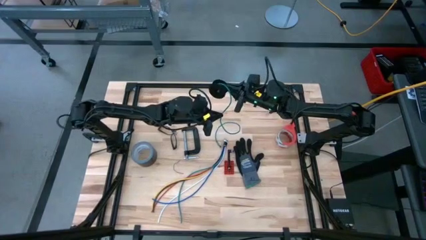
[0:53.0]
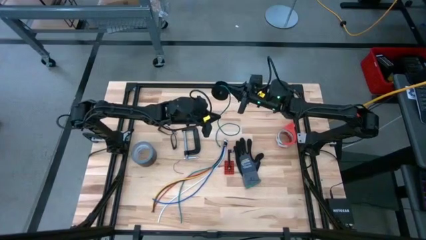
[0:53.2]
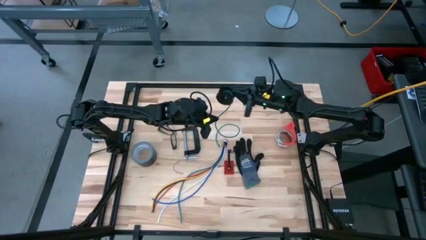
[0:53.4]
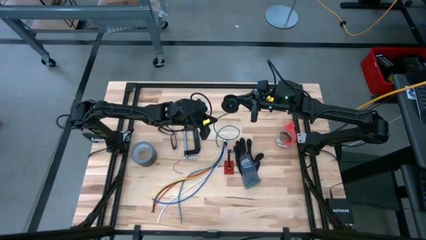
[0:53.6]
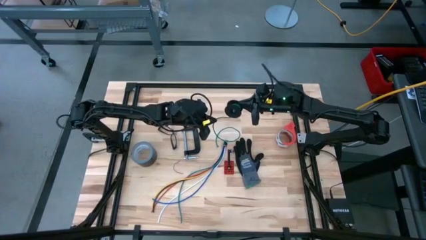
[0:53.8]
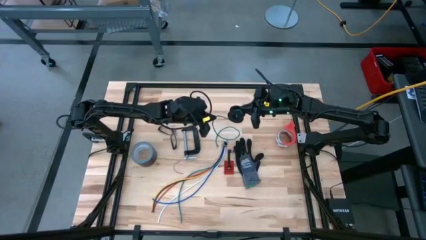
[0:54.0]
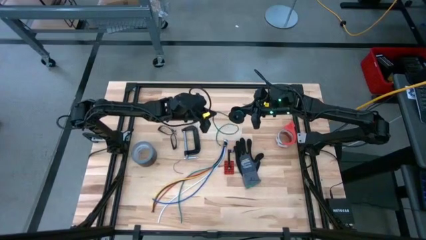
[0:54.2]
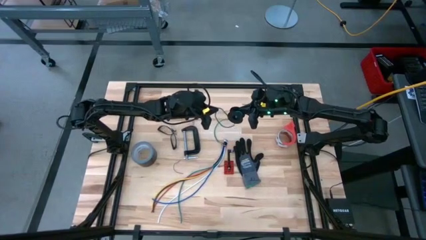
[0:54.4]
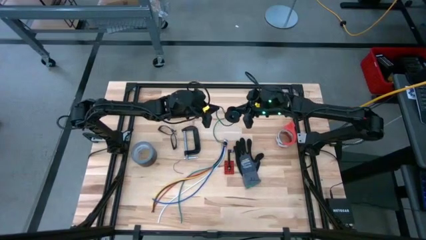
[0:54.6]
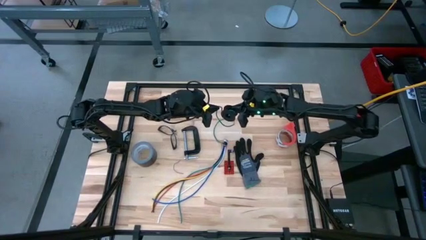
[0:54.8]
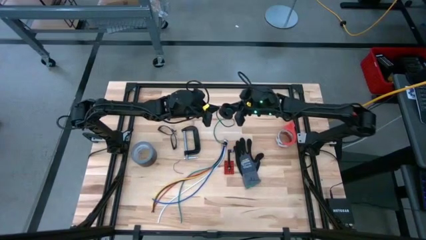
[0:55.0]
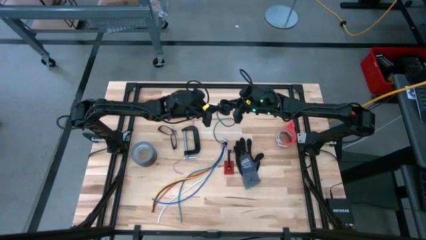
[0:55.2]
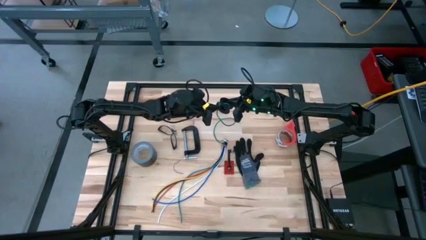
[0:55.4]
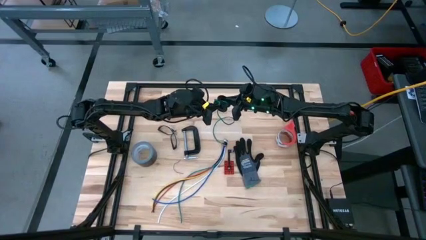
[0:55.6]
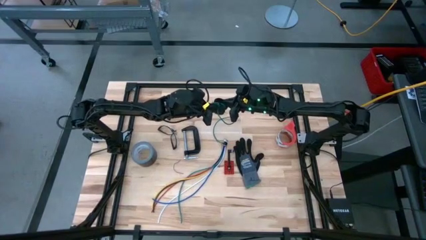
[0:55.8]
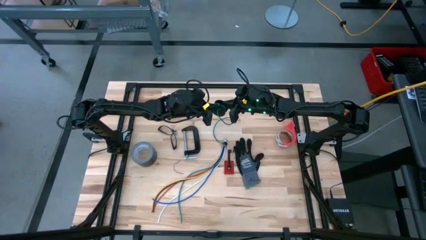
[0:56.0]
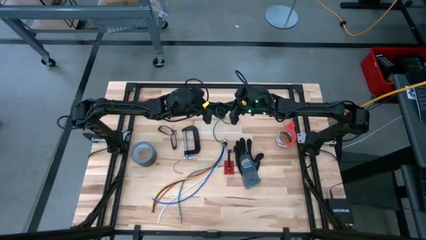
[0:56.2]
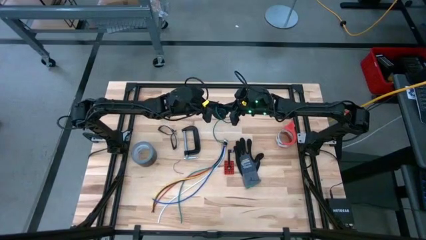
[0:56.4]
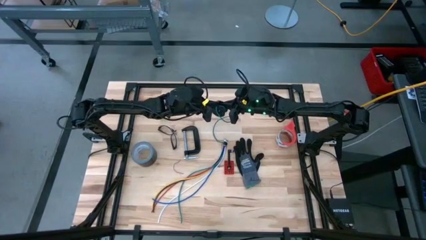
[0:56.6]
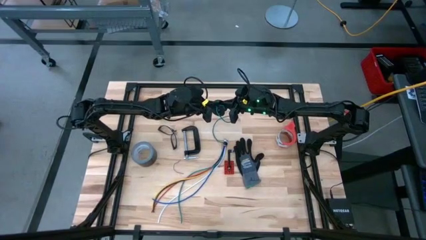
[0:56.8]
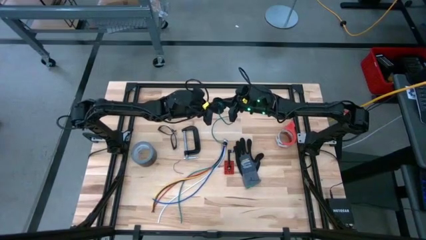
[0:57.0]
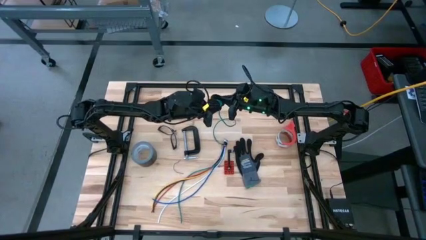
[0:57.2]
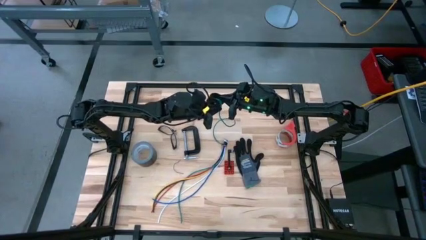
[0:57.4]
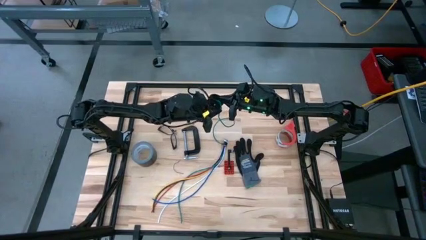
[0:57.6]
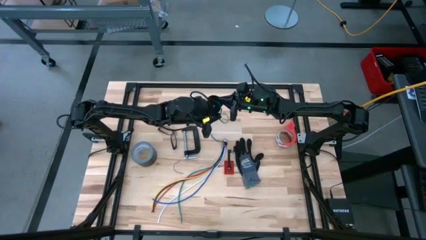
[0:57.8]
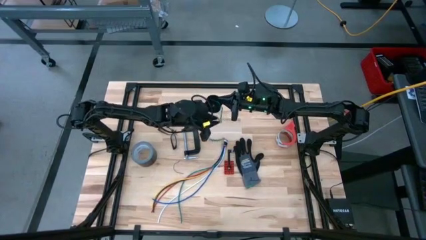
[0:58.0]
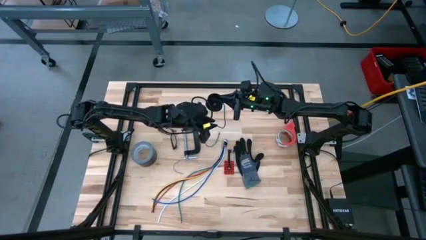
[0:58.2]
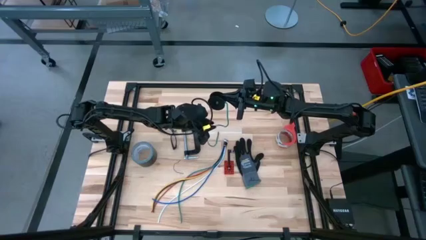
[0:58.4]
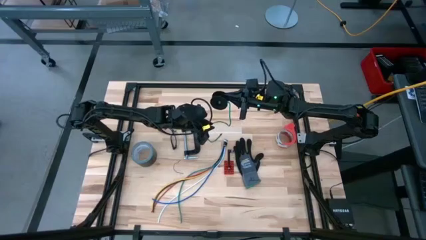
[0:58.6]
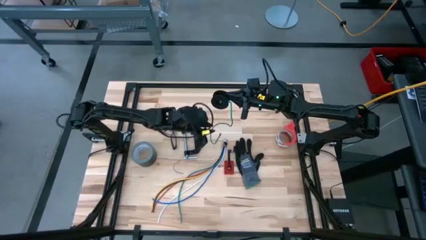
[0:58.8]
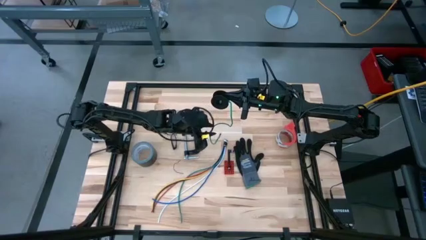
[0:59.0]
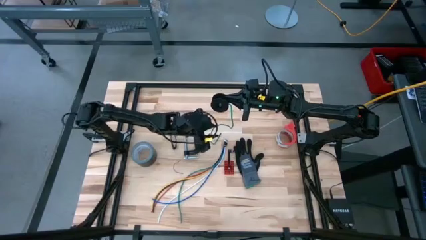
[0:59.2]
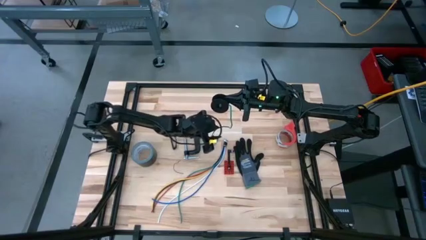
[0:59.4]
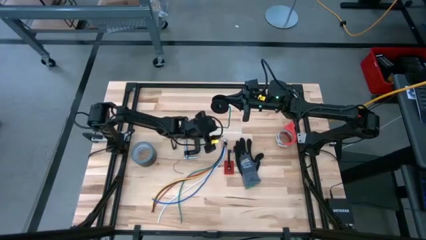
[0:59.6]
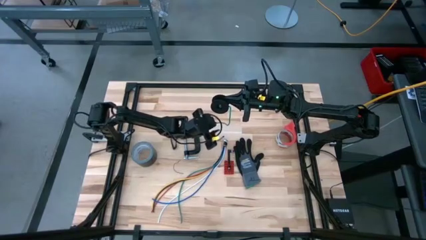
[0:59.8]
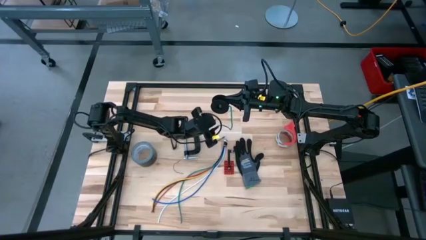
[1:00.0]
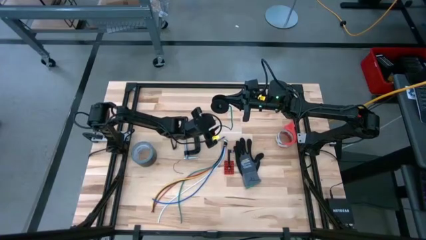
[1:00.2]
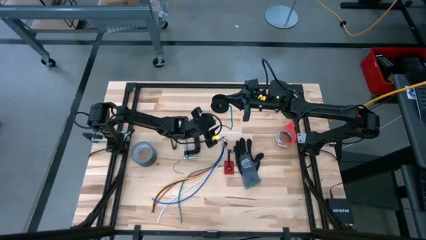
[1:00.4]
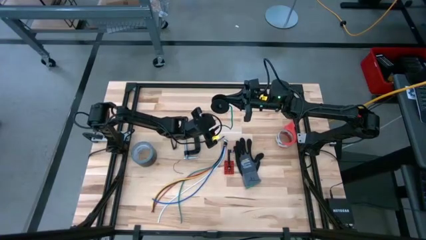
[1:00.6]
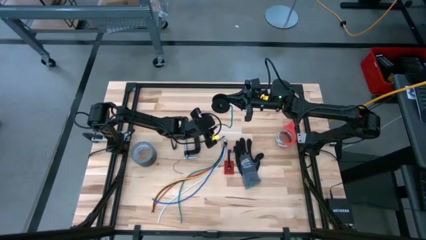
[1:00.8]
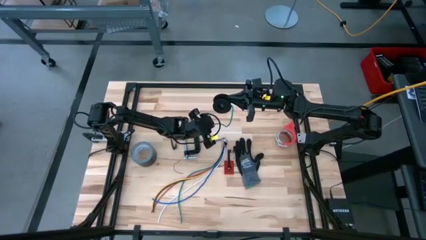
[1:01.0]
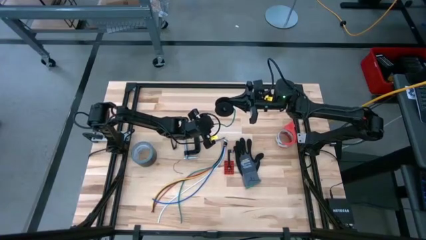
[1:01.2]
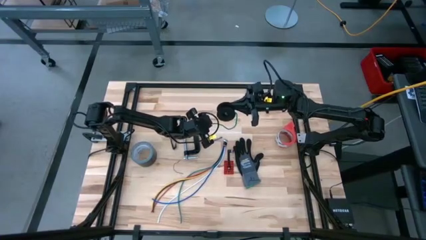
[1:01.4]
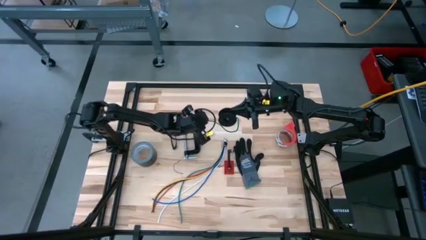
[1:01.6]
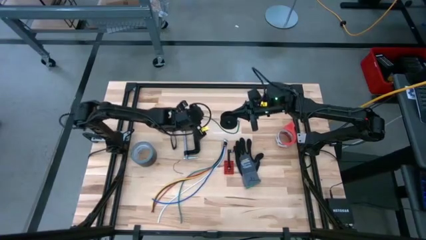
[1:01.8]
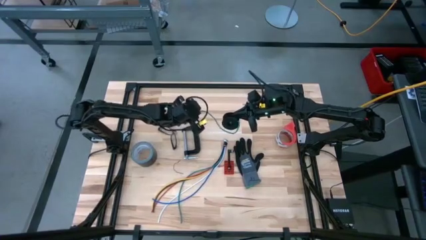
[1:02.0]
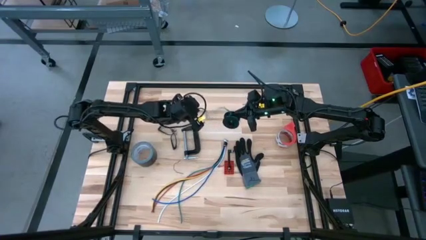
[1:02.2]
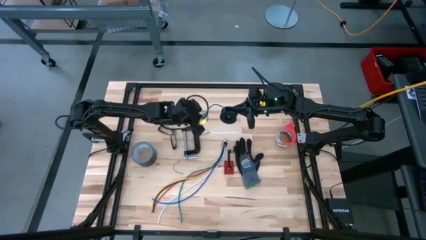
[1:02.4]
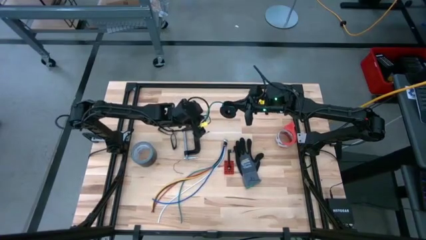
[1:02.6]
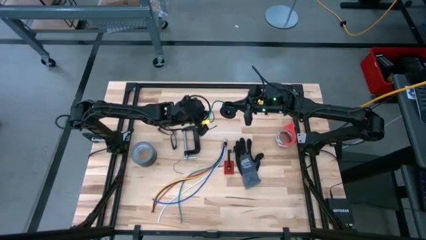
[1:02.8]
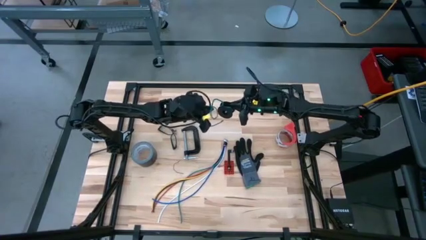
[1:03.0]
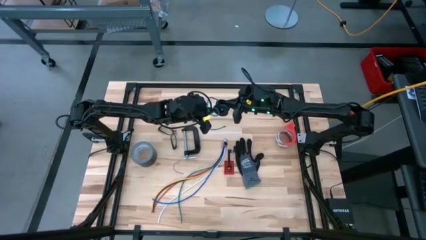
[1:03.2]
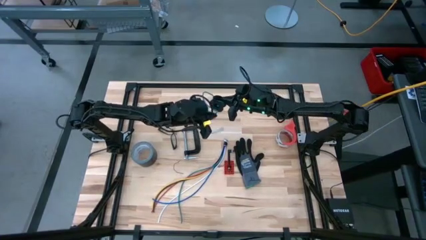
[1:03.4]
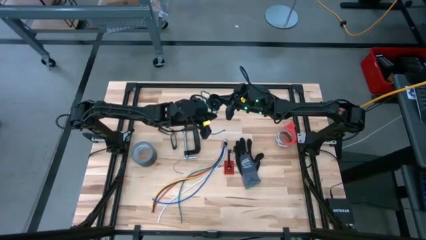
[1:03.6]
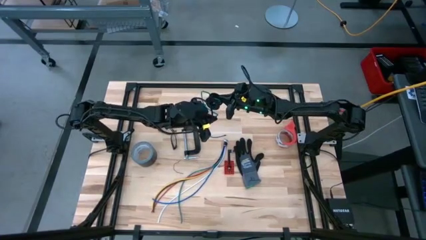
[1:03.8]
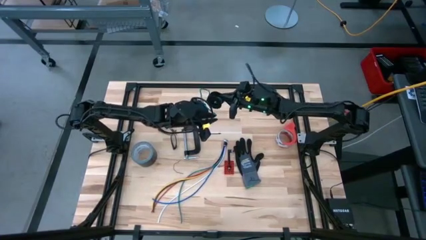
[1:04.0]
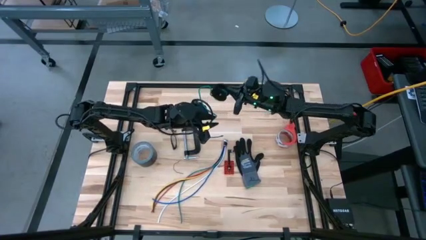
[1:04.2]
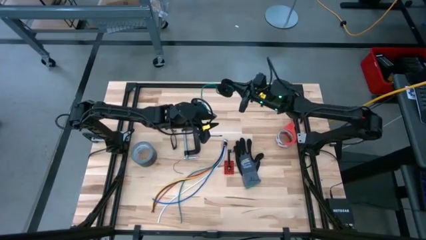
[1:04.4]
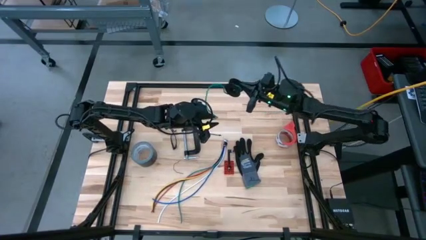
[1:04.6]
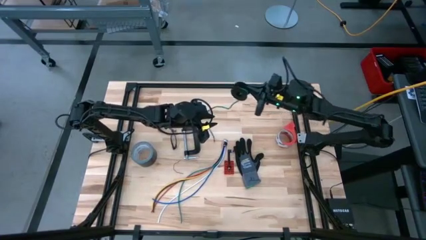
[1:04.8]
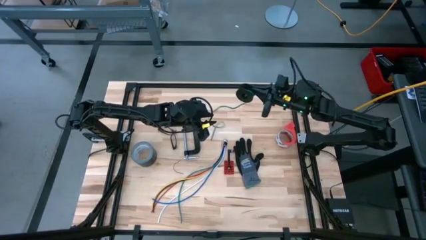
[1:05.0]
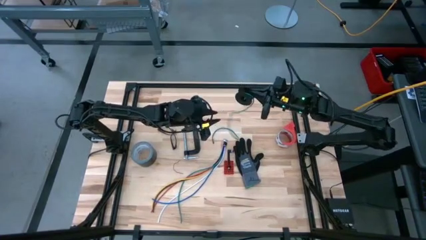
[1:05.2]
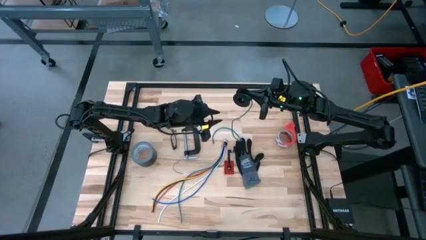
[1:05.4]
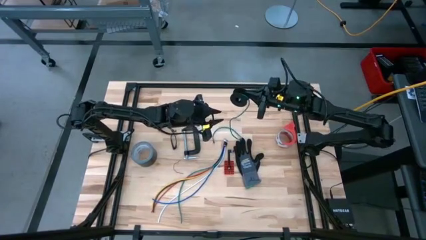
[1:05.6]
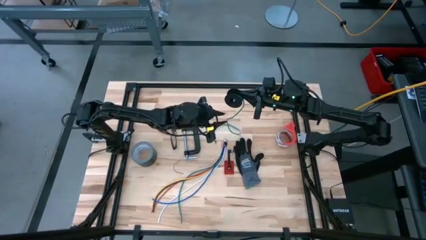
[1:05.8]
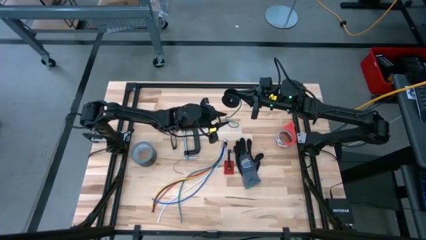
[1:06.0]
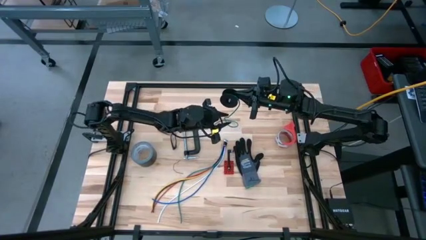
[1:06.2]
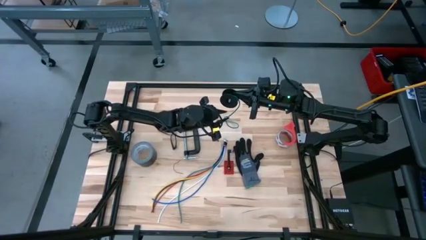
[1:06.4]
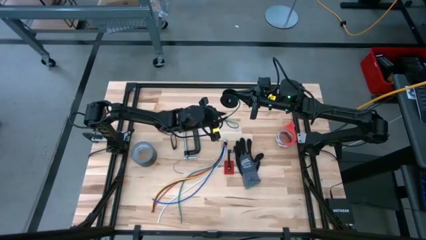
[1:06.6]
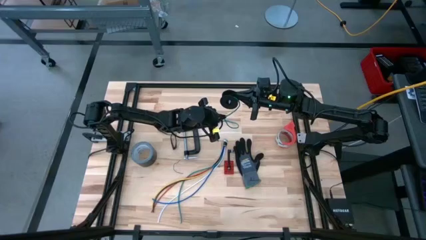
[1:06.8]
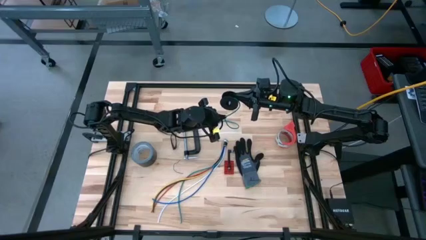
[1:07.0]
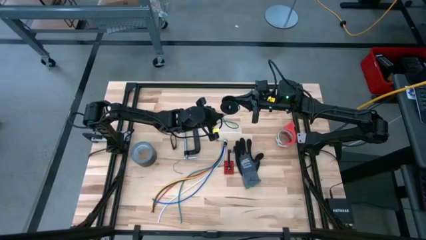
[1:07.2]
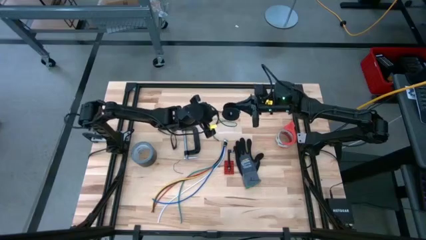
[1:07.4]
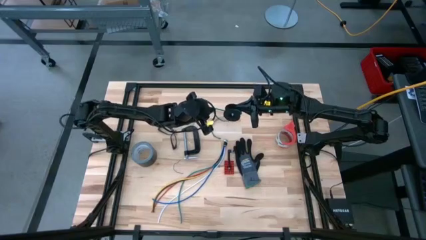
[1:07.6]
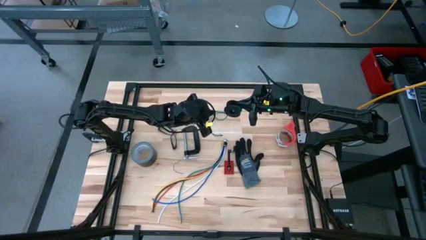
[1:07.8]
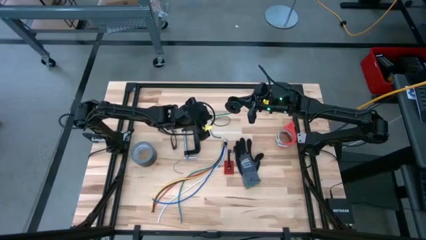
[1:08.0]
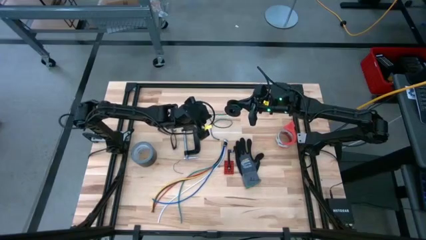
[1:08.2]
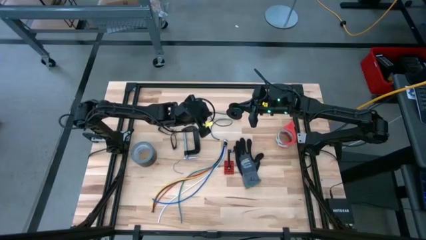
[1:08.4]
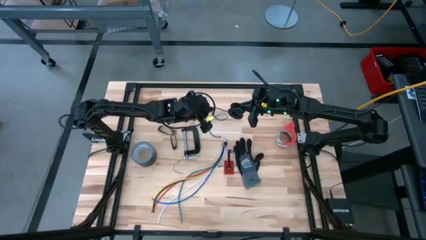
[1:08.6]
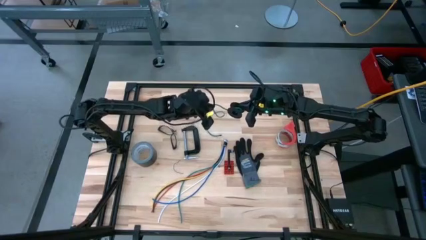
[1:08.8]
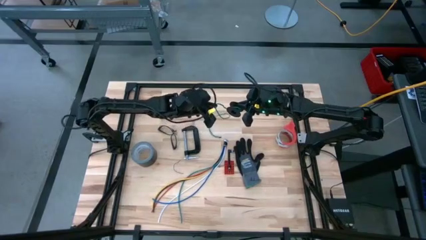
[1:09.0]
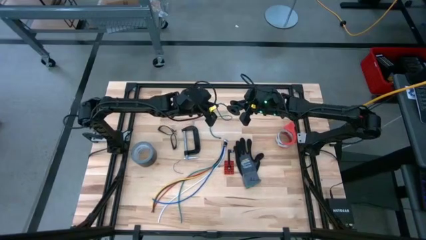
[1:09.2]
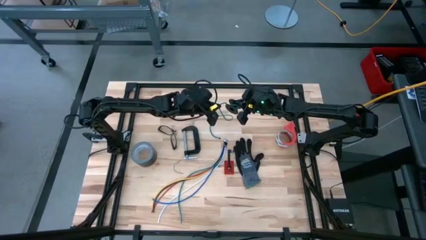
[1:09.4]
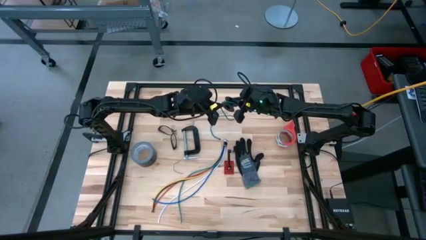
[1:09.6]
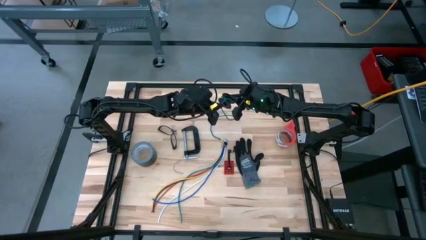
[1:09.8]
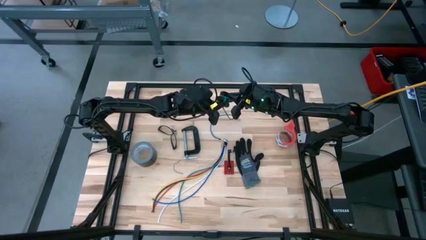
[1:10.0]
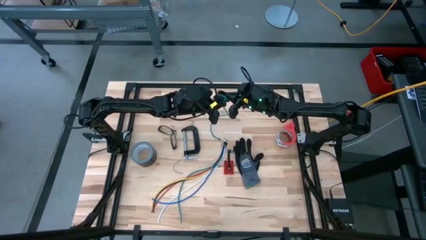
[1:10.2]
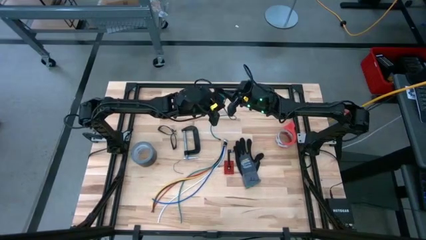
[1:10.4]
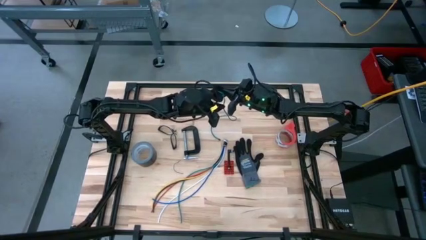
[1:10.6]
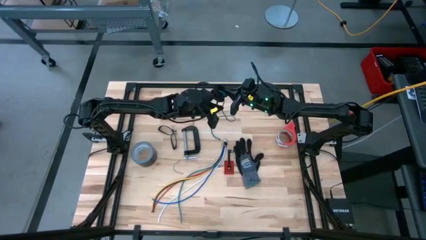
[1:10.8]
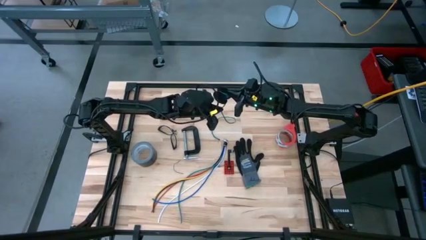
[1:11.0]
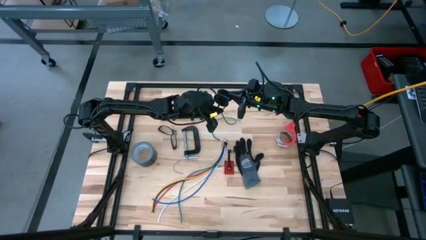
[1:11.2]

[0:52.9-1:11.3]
Task: Coil cords
Coil the green wire on the spool
